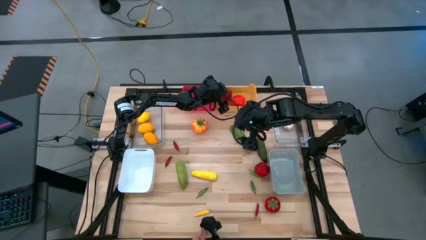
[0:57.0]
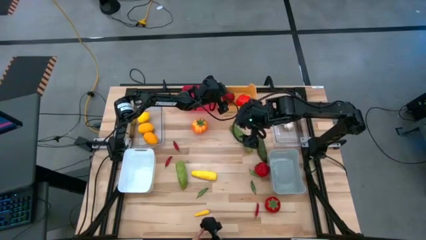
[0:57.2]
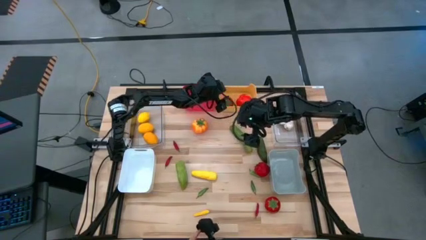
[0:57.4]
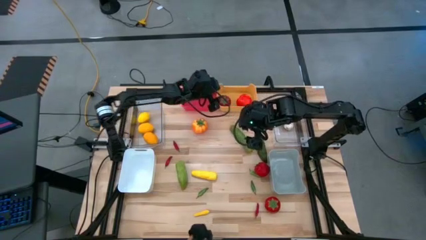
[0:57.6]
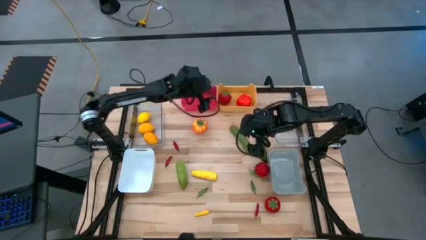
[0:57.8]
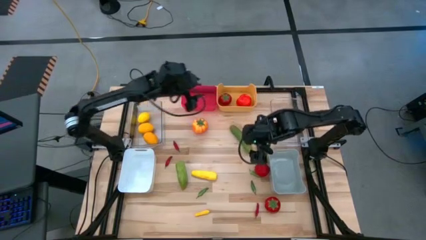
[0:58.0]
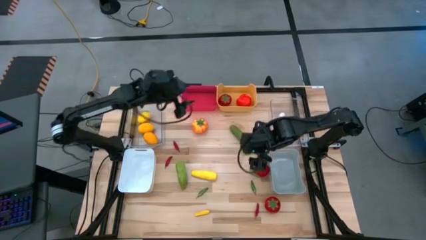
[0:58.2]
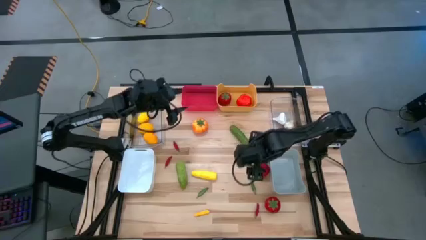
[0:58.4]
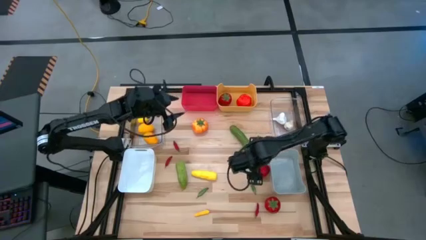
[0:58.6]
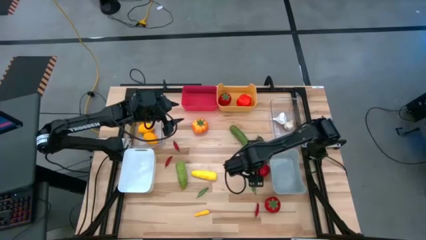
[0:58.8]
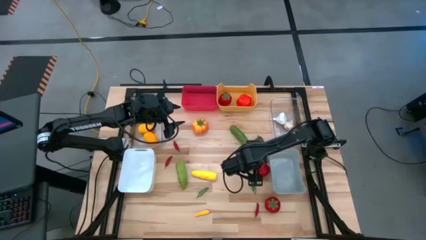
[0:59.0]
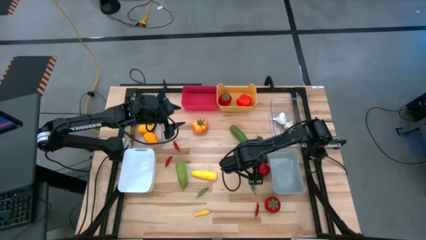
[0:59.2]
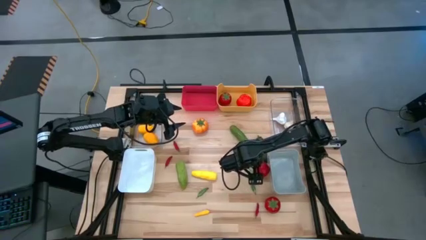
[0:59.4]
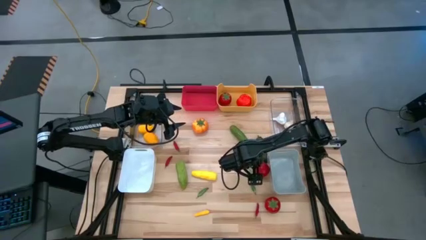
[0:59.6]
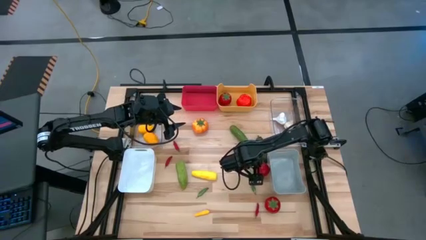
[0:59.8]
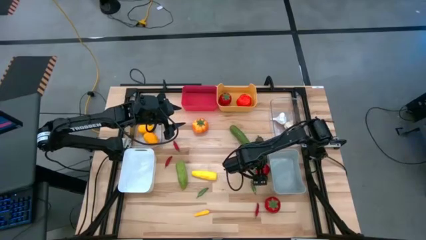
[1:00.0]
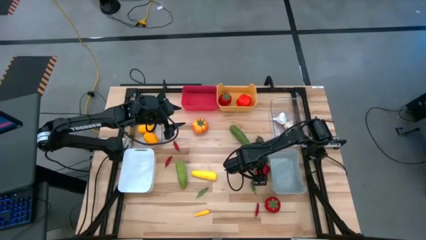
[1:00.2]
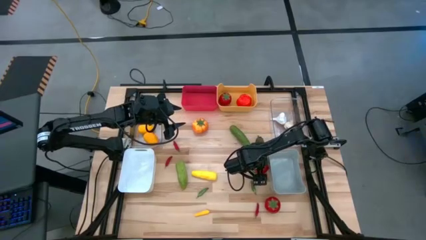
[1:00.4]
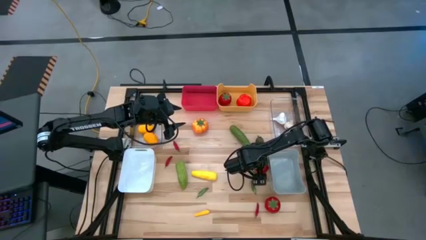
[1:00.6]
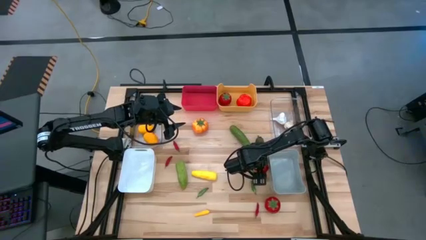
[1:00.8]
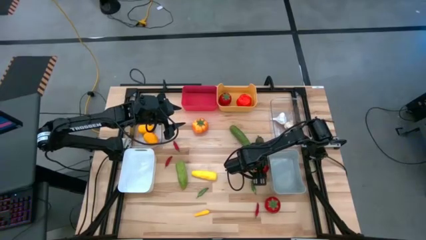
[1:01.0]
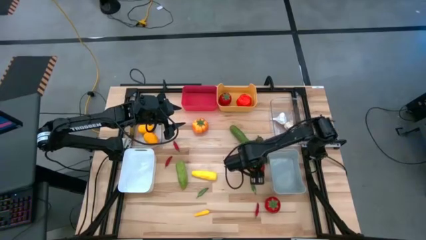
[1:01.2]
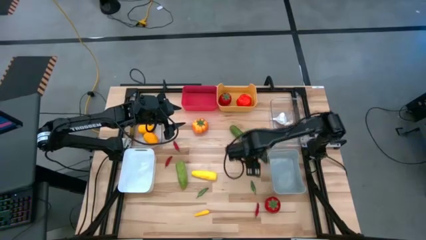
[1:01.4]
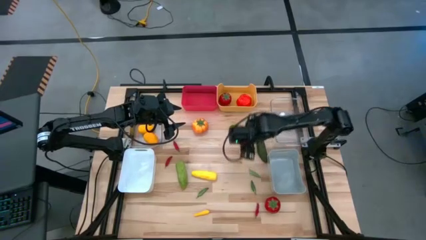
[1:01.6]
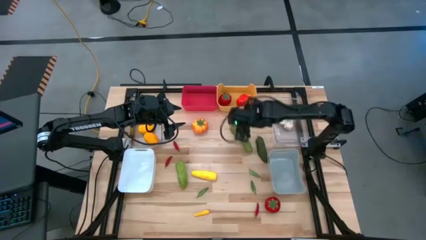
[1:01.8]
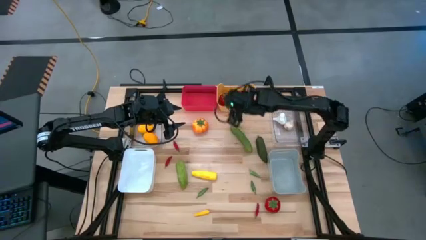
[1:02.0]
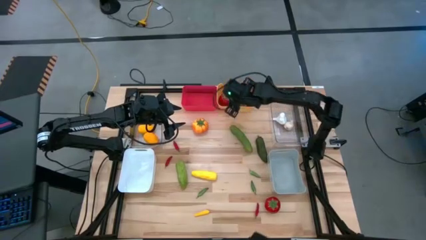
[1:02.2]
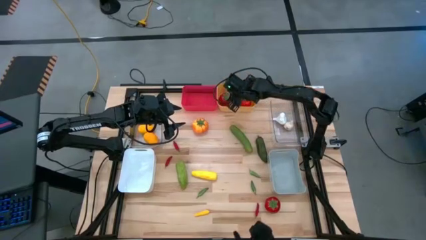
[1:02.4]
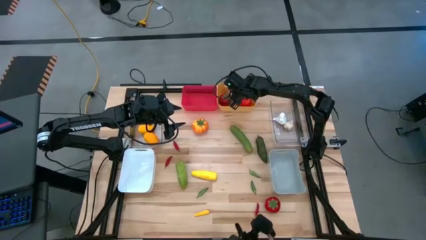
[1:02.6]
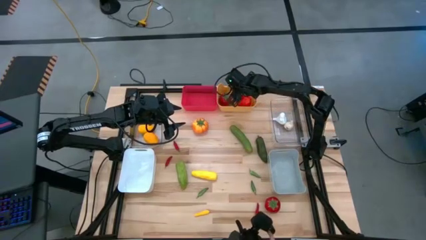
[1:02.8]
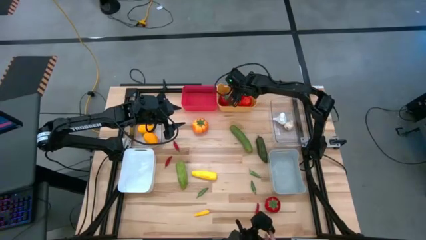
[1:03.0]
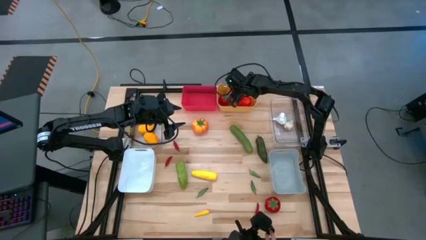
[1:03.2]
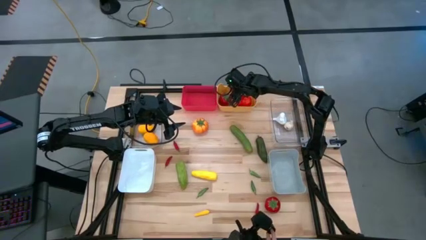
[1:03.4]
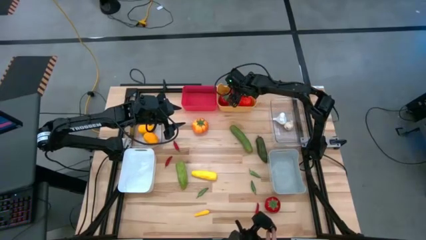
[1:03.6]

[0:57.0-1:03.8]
Task: Sort produce into baskets
Put the red tomato into the yellow bin

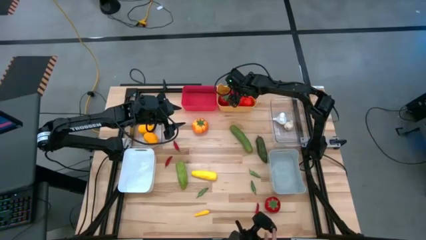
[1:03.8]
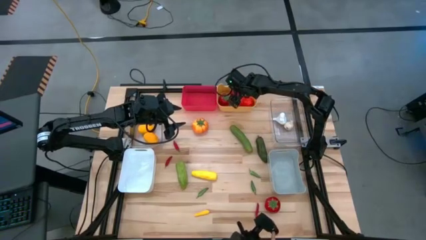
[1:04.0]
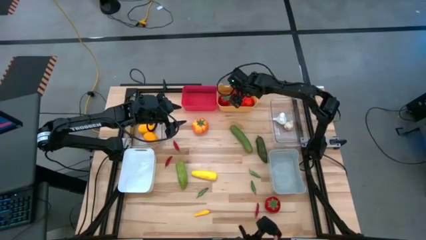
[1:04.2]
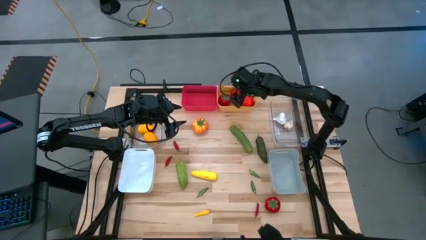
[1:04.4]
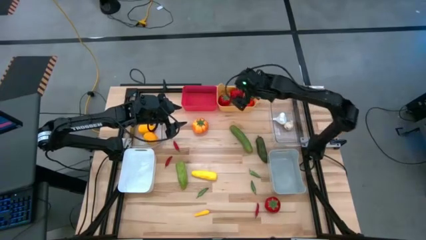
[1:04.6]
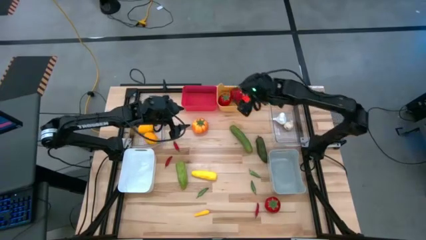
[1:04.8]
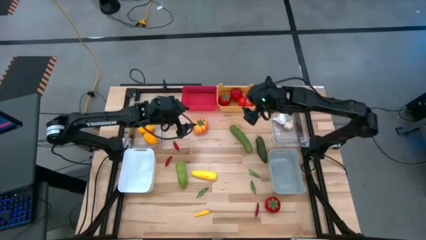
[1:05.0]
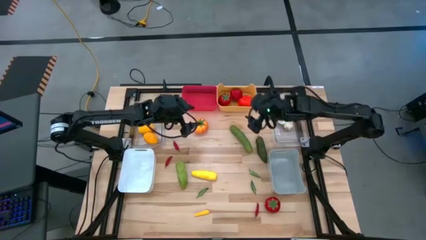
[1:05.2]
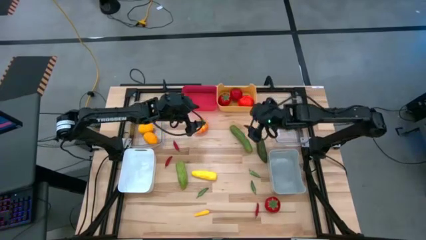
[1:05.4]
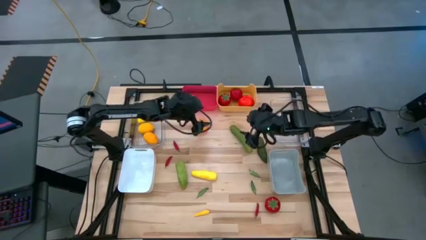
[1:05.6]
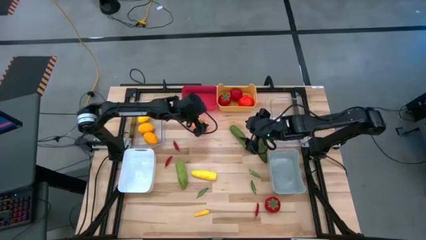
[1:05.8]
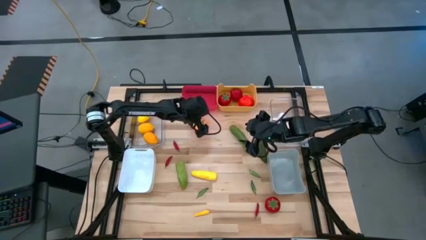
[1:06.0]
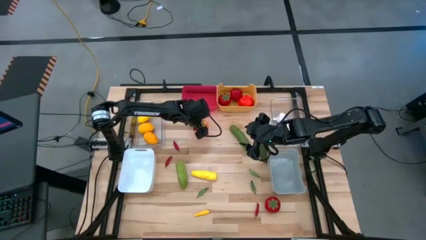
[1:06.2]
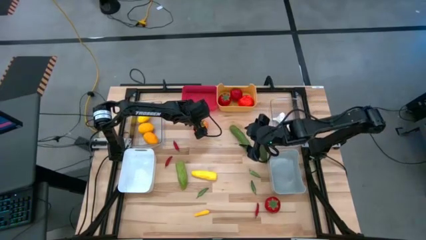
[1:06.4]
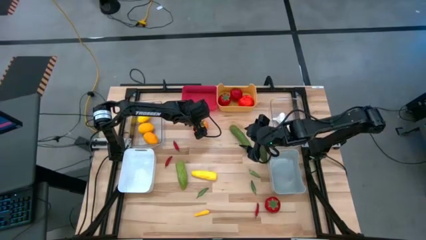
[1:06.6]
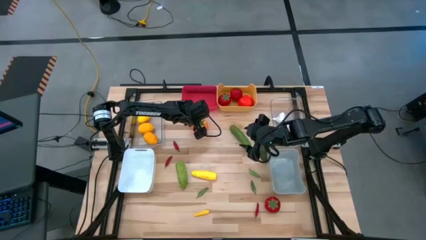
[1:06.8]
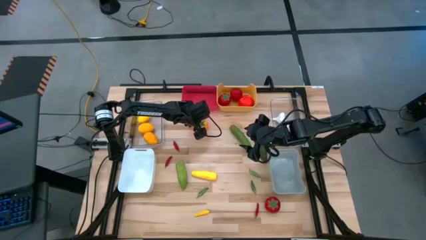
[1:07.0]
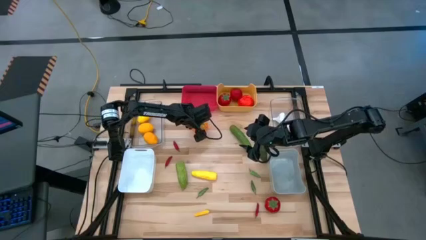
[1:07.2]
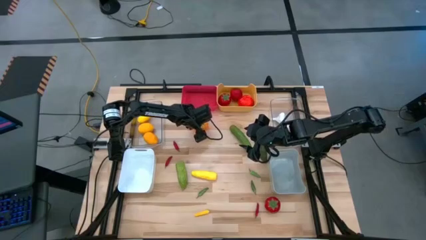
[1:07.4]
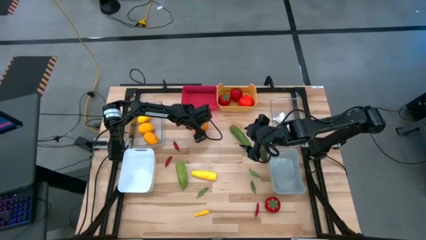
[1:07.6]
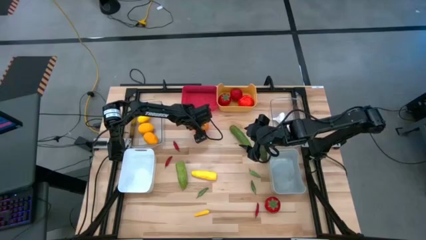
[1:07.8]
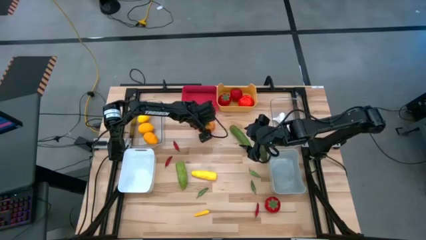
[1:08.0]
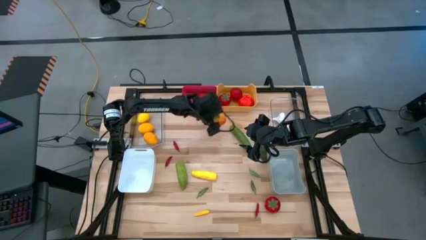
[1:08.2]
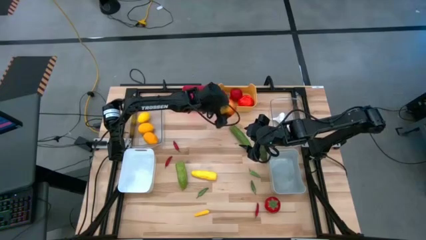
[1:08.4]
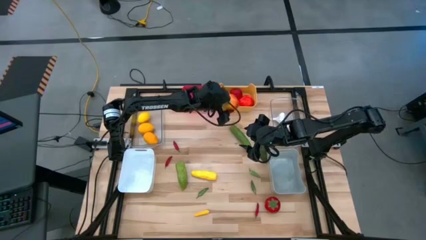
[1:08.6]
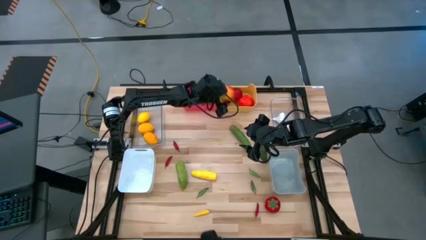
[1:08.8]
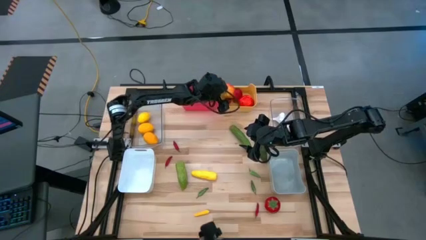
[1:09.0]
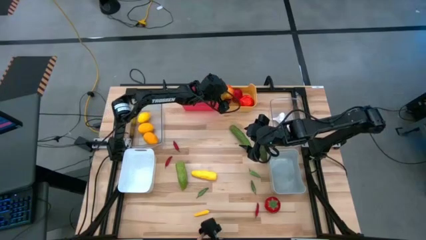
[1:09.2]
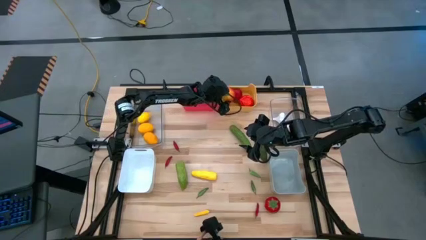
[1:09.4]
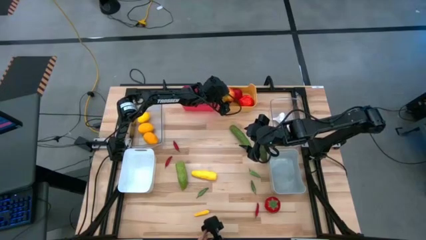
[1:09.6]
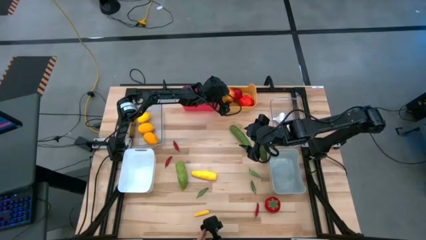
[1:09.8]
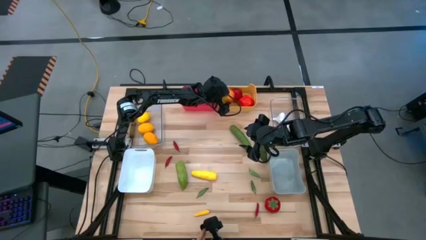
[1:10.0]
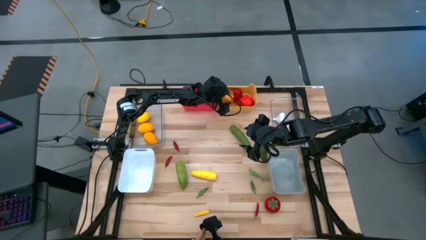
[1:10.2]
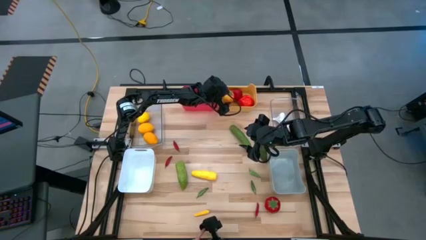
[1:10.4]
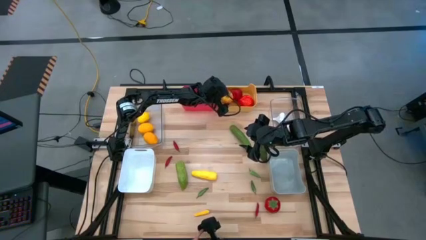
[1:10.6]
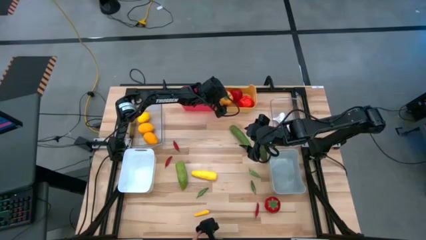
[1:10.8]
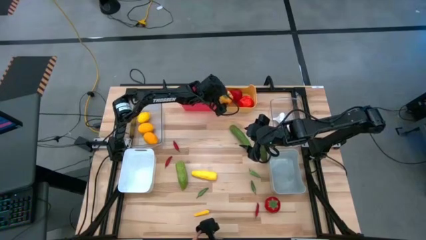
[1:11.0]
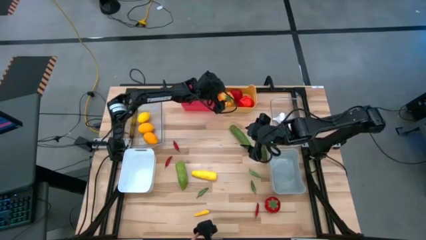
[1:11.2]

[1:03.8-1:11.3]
Put the yellow tomato into the yellow bin

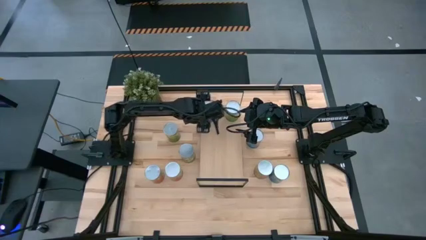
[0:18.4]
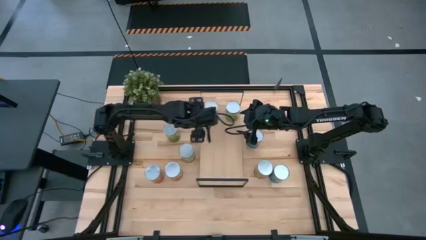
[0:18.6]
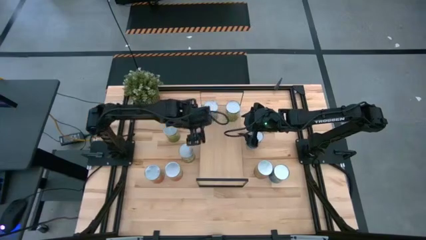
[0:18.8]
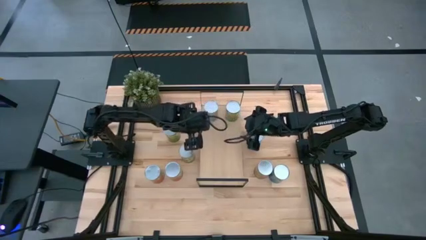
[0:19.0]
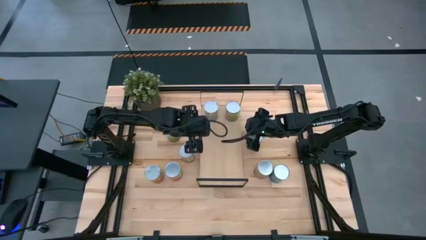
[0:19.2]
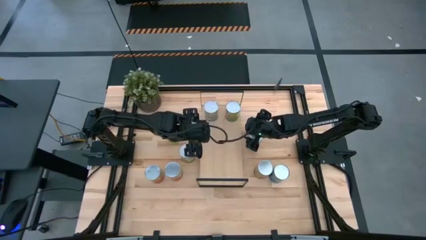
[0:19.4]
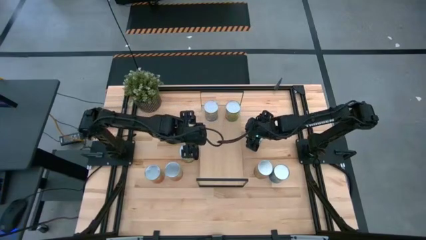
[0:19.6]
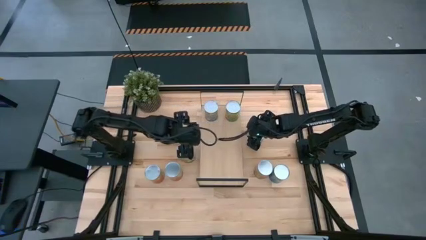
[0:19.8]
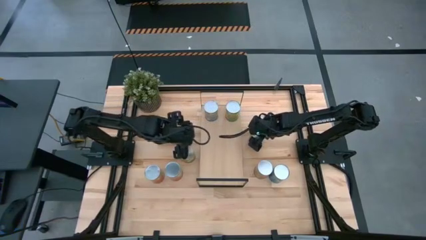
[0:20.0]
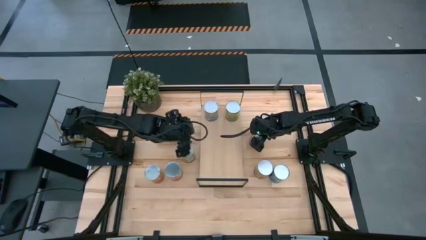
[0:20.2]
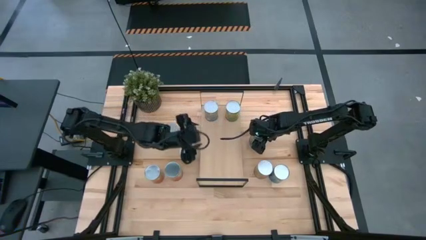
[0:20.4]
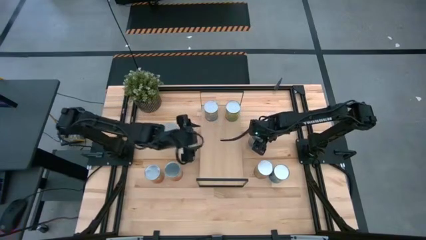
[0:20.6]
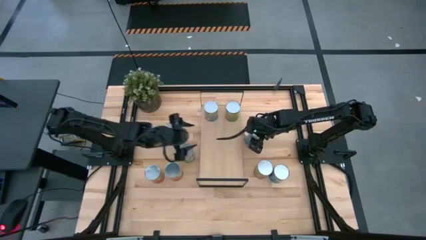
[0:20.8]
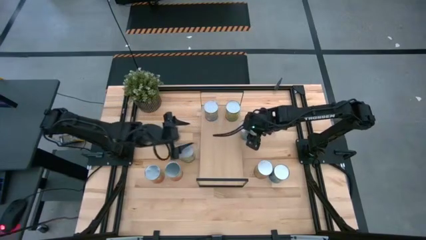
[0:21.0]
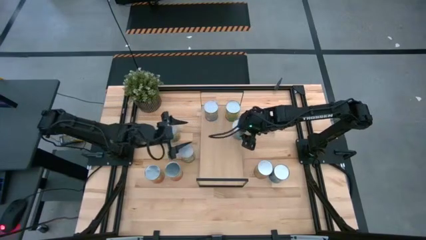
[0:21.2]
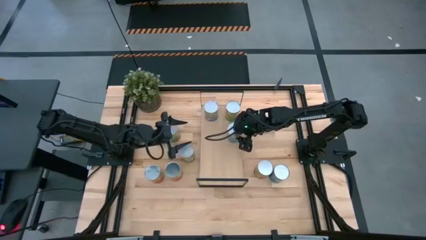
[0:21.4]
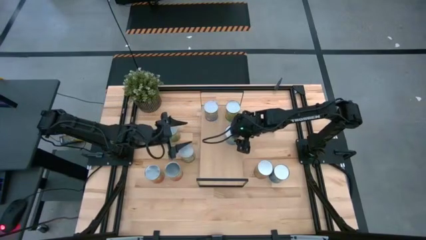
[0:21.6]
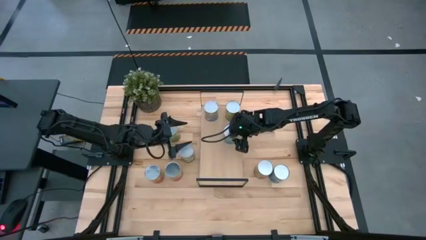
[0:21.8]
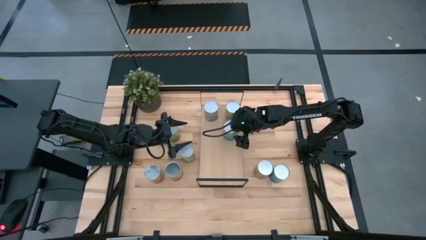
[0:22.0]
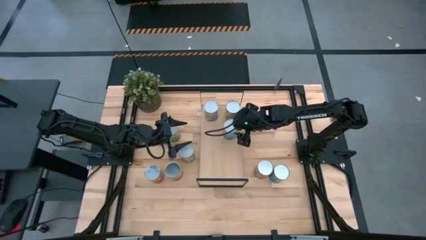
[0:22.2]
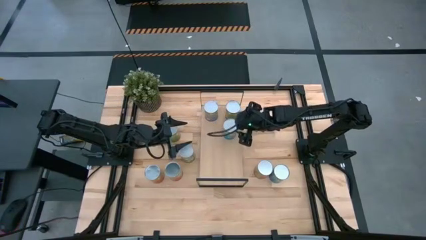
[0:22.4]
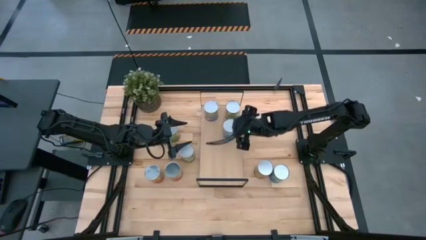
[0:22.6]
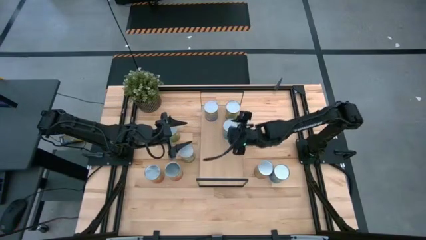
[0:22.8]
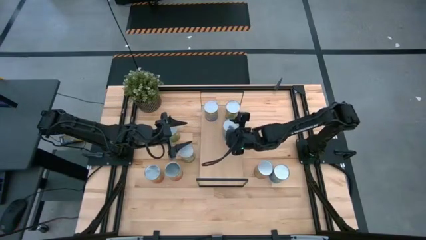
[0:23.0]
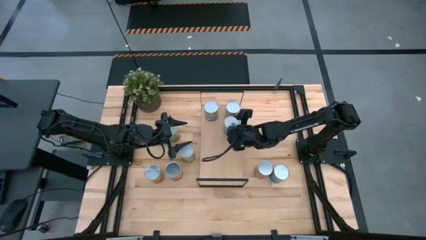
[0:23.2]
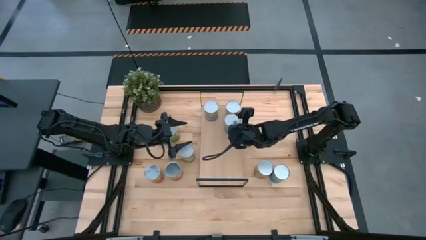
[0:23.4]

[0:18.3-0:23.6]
Task: Pick and place cans onto a shelf
Put the canned tomatoes on the shelf
